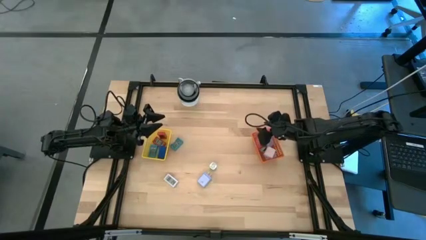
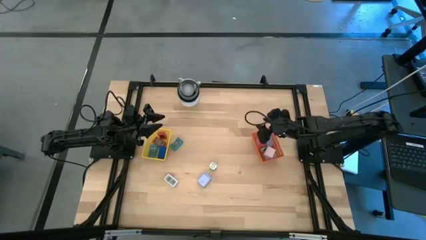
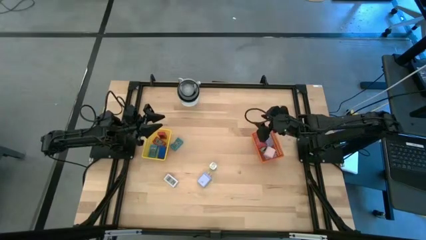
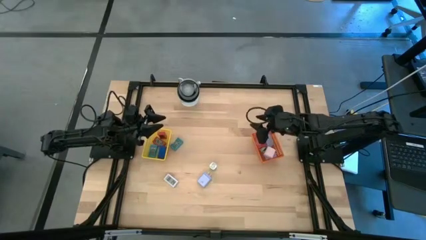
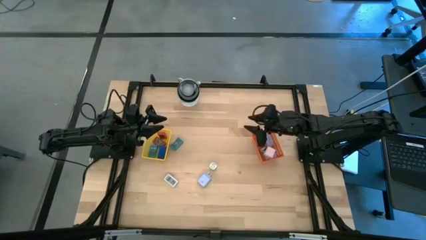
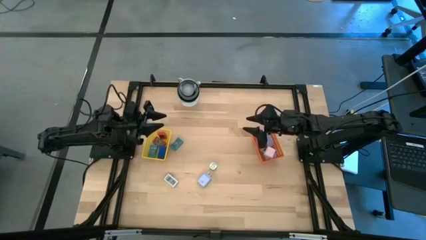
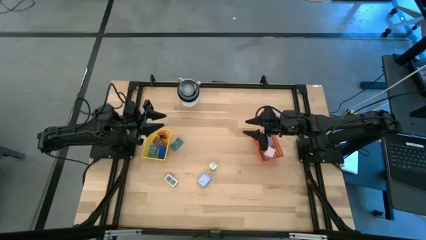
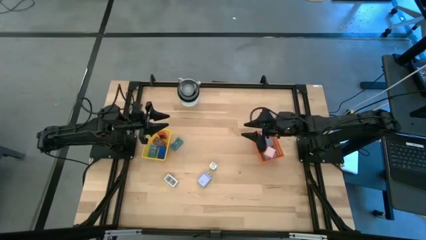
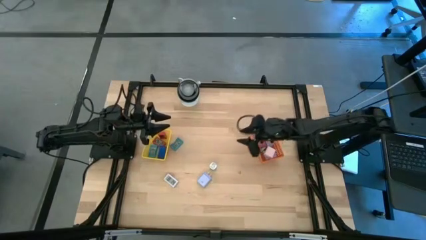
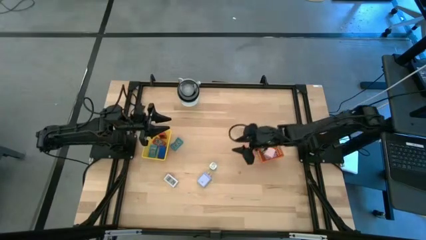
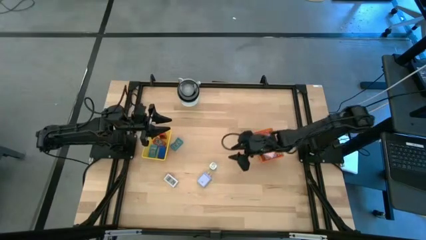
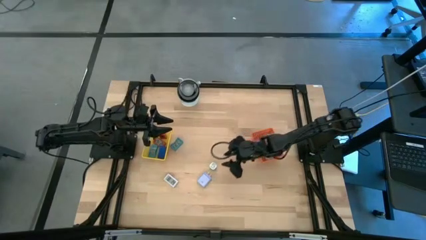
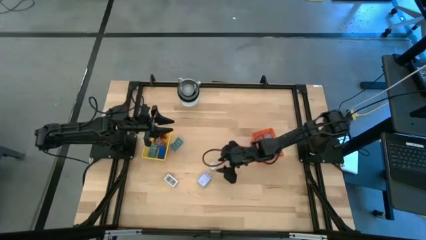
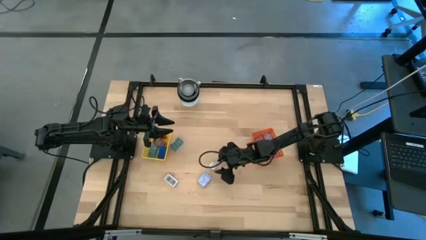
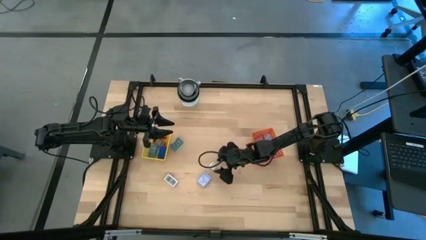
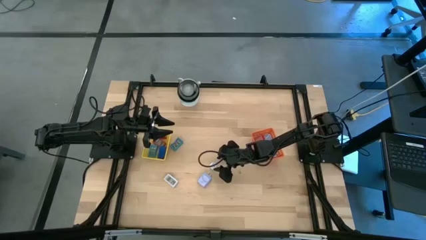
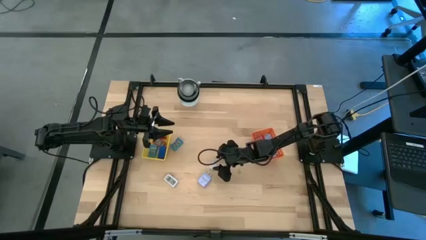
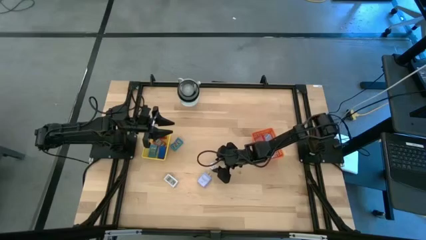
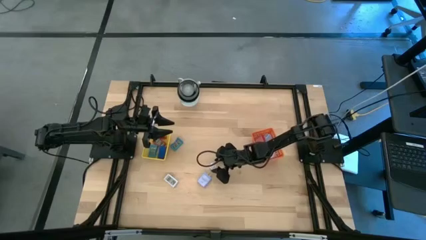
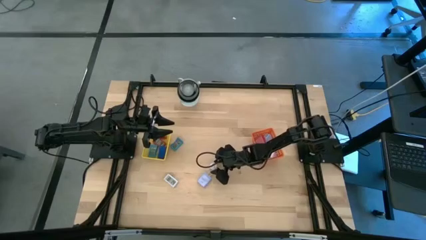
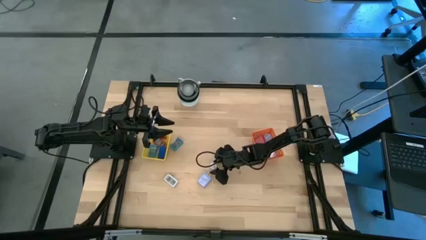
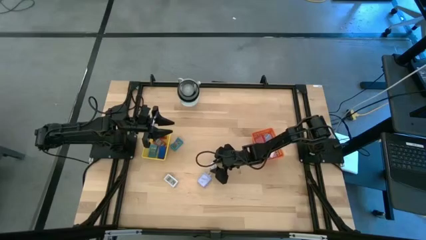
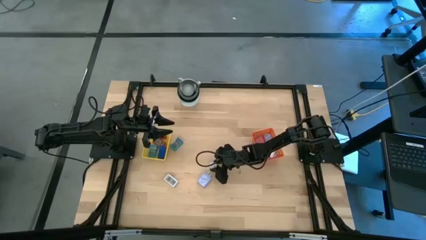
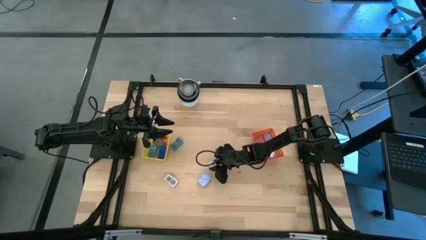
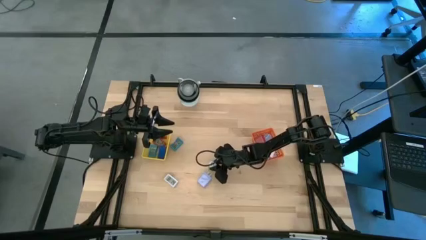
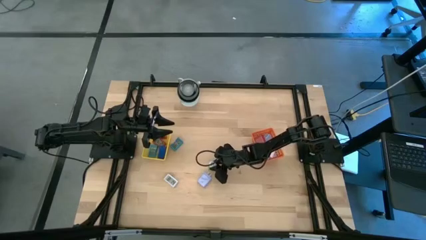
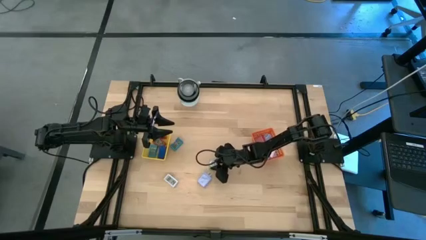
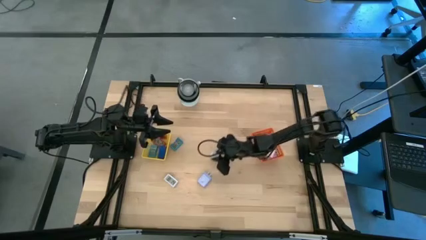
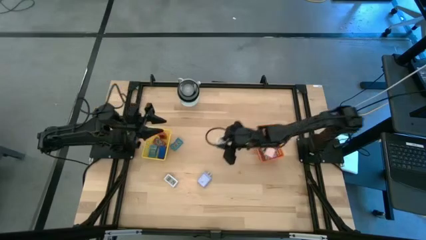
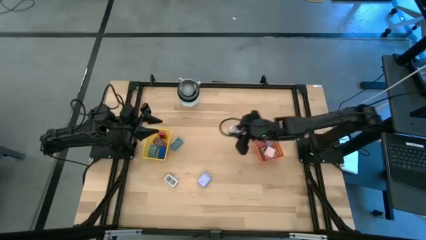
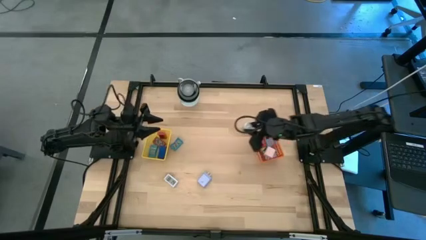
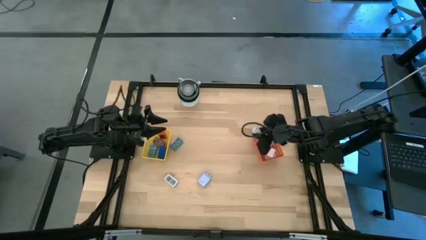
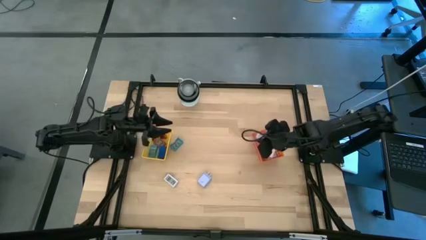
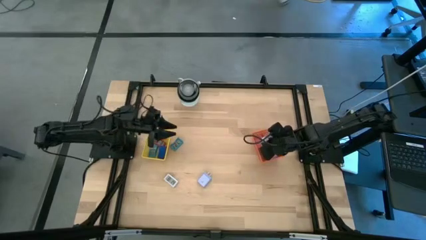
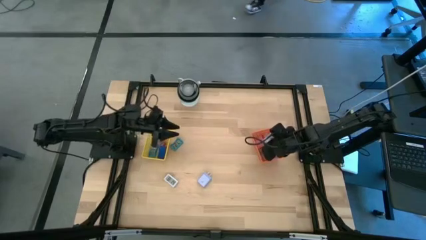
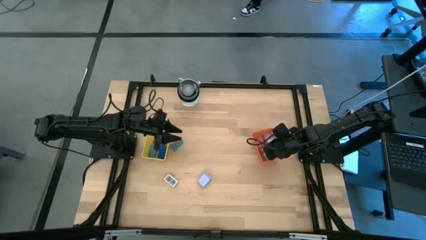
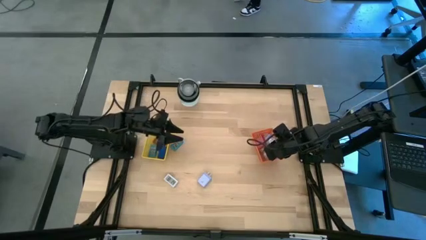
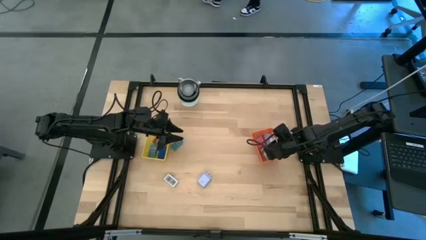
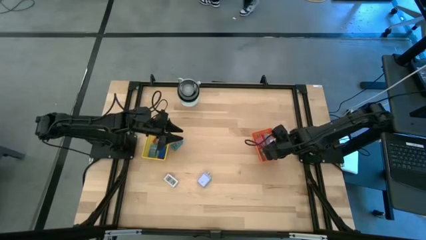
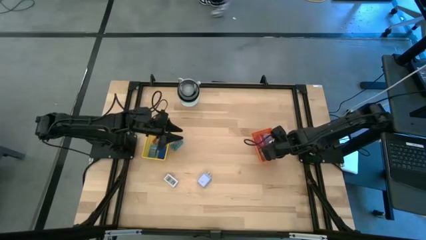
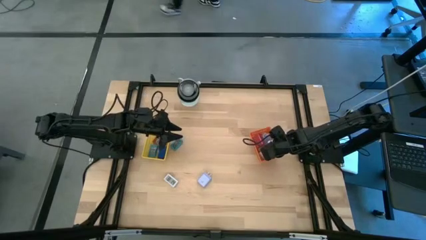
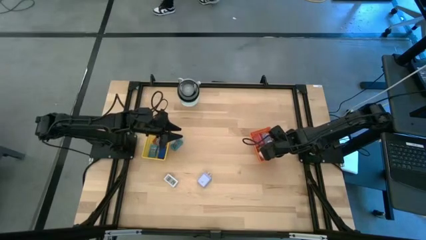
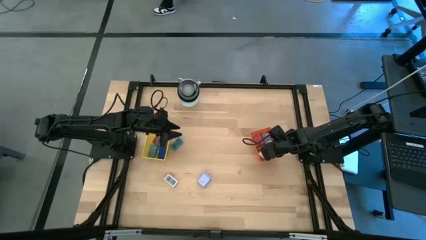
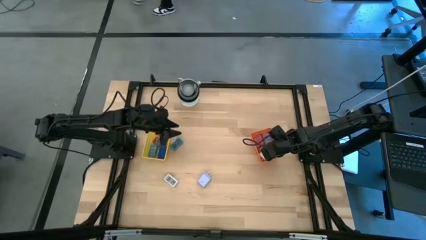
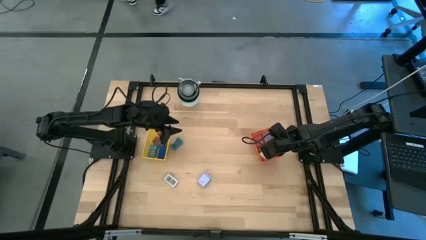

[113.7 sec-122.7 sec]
Task: Pick & Place Office items
Put the green charger adapter into the orange basket

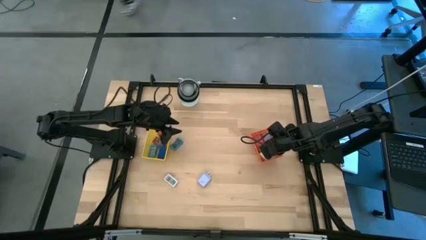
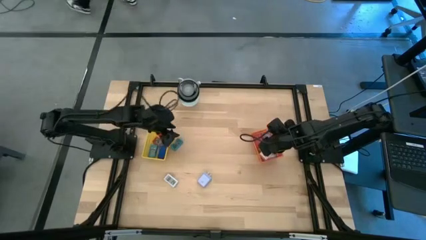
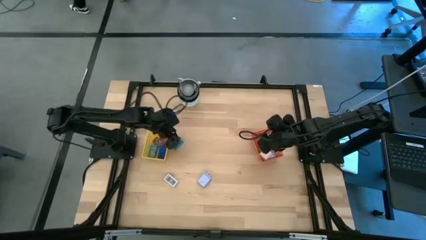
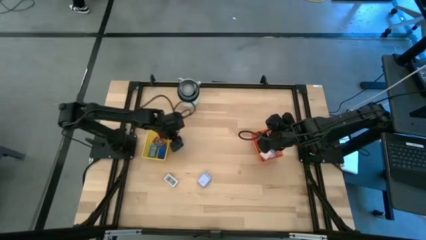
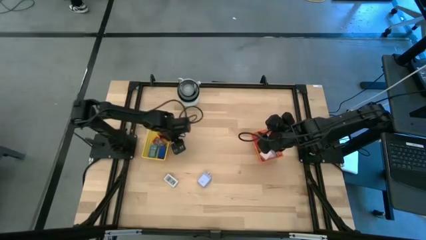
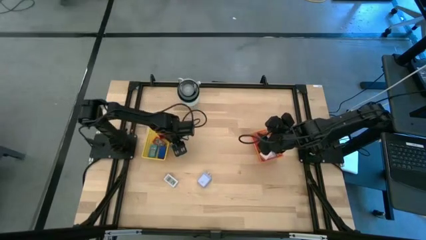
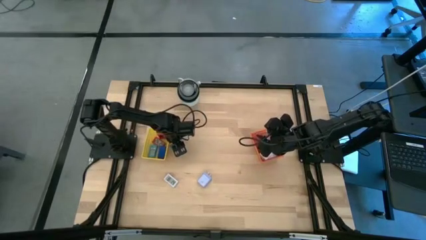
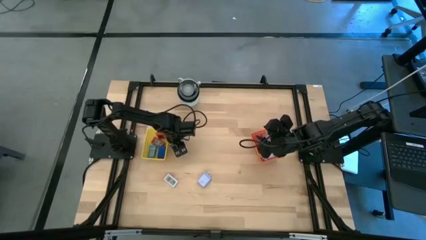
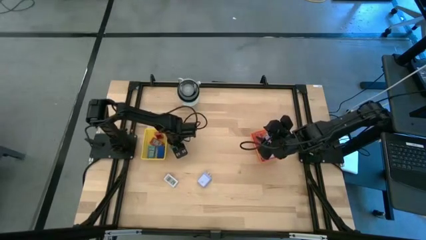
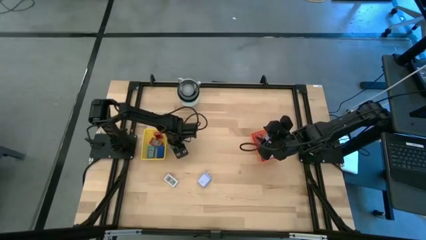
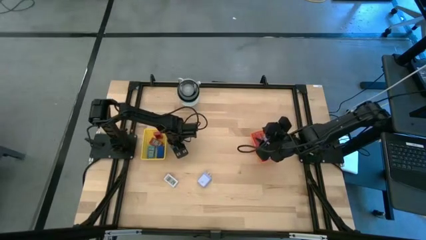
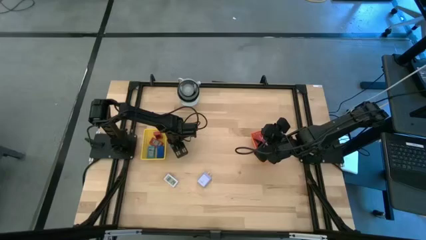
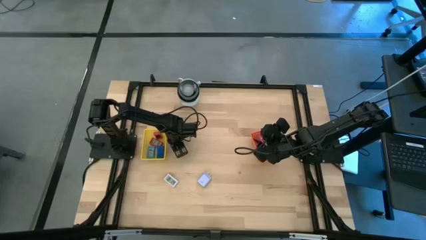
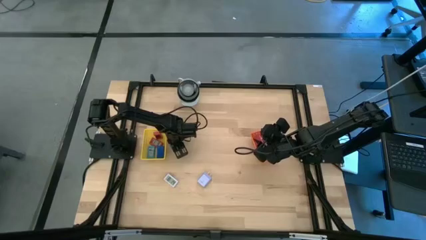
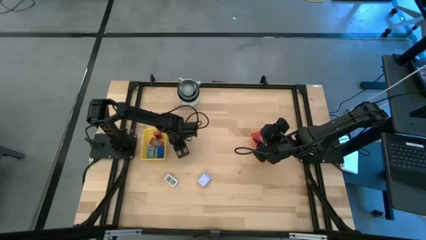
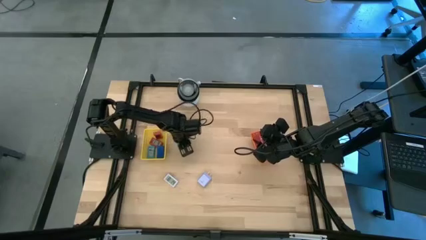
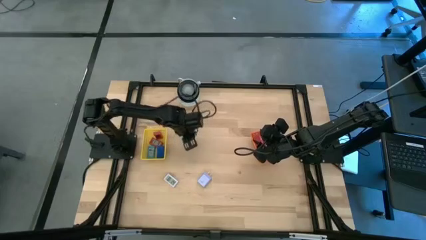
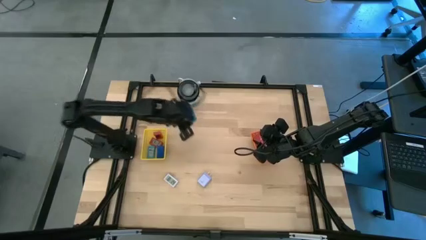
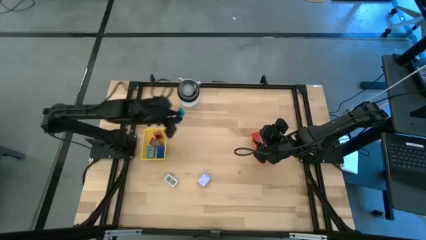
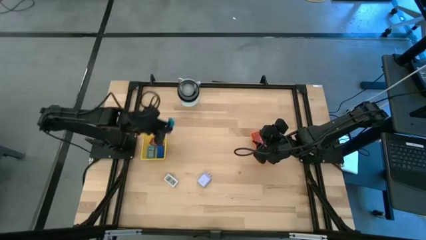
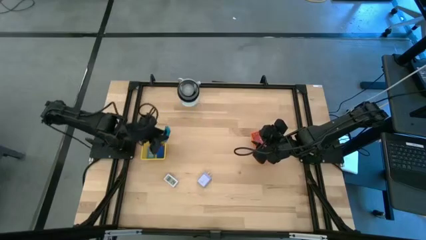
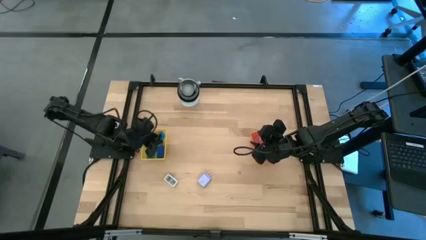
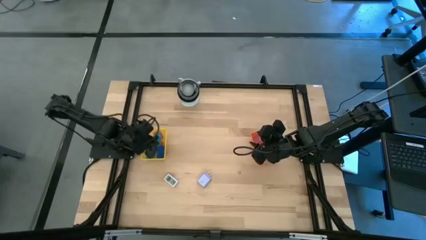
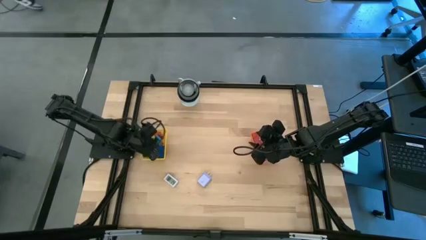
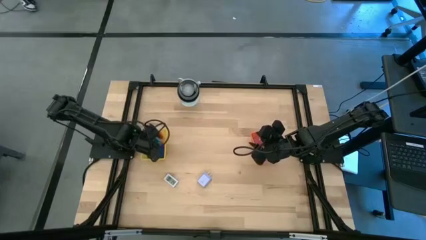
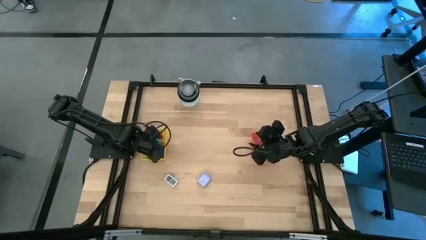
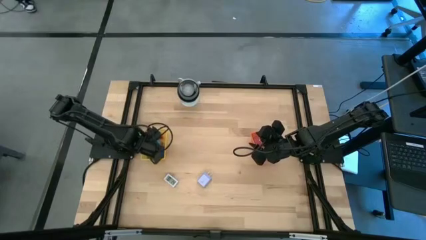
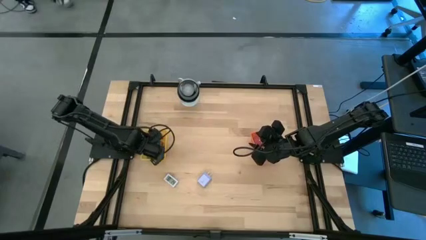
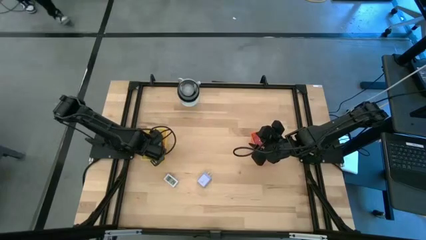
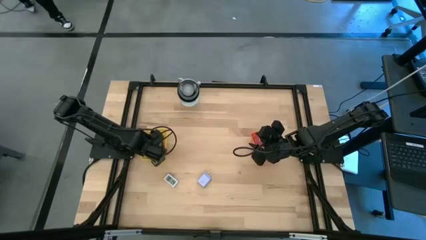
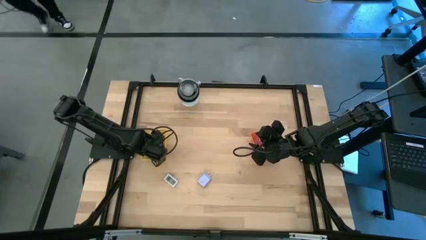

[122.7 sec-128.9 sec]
Put the light blue digital clock into the yellow basket

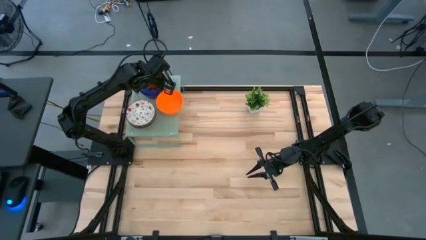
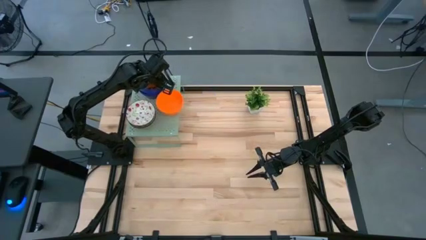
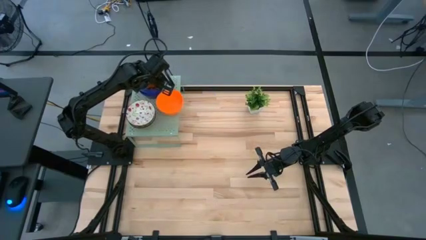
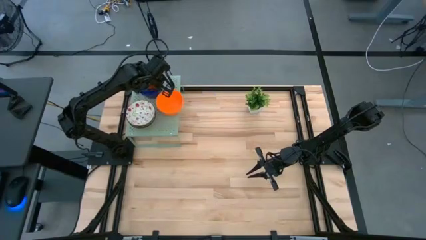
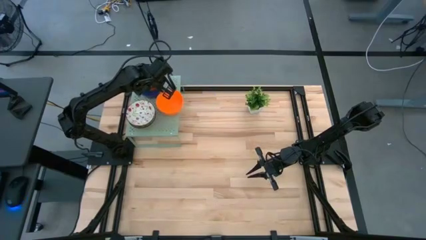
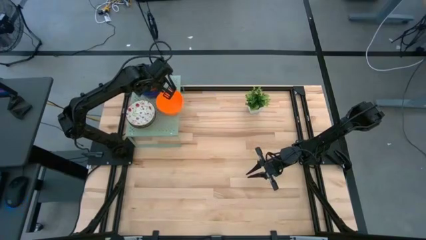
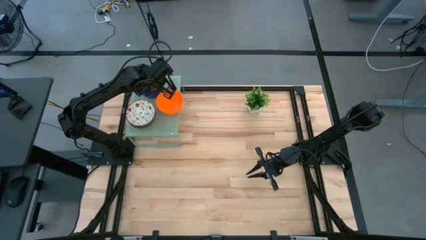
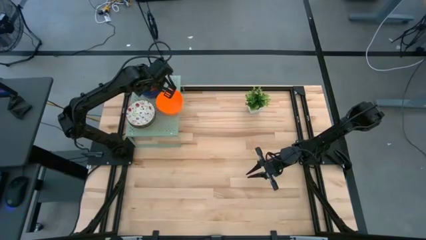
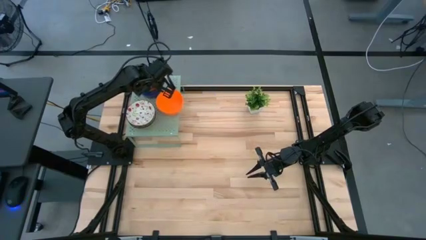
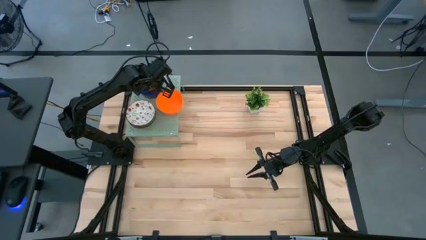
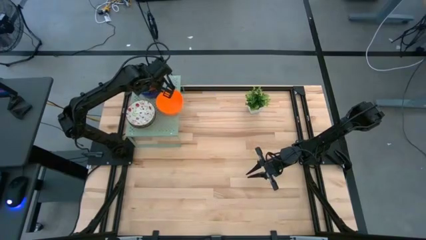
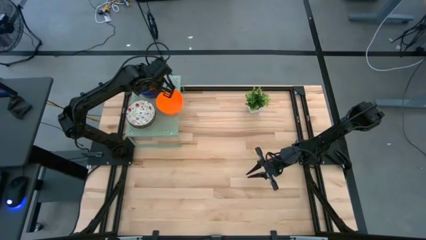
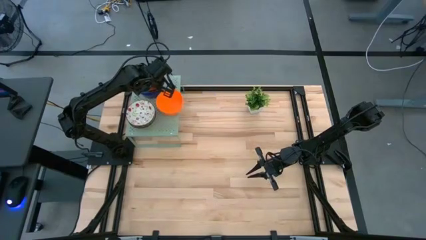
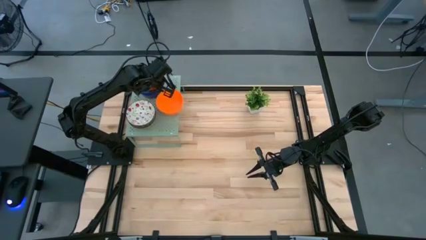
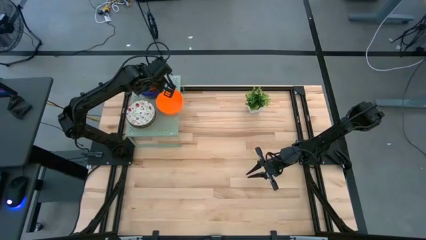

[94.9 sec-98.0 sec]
Task: Pick & Place Mini bowls
Stack the blue bowl on the blue bowls on the shelf
